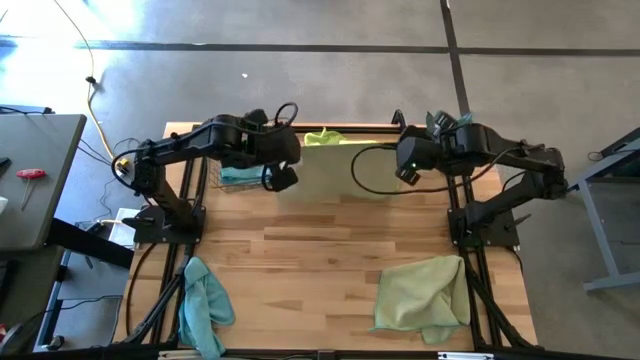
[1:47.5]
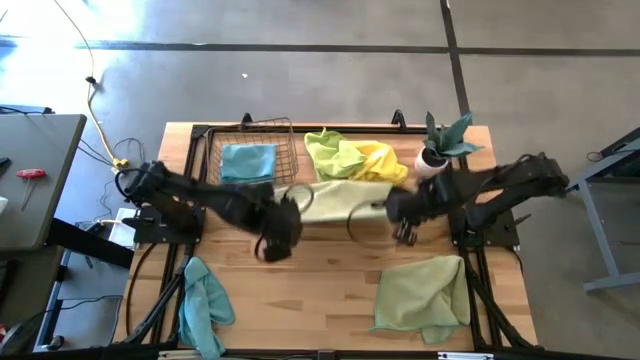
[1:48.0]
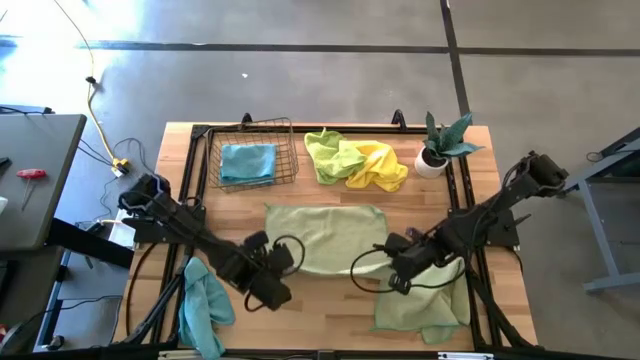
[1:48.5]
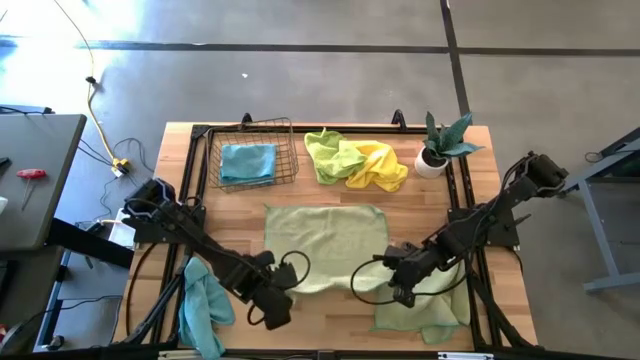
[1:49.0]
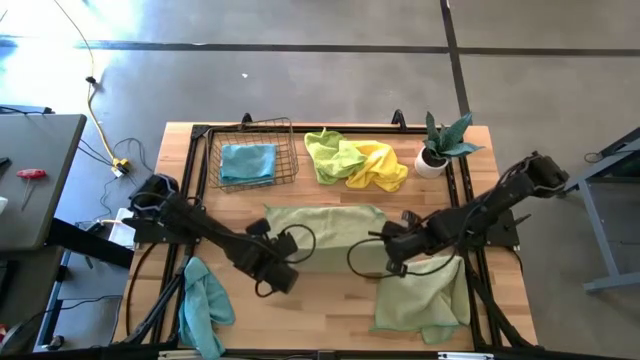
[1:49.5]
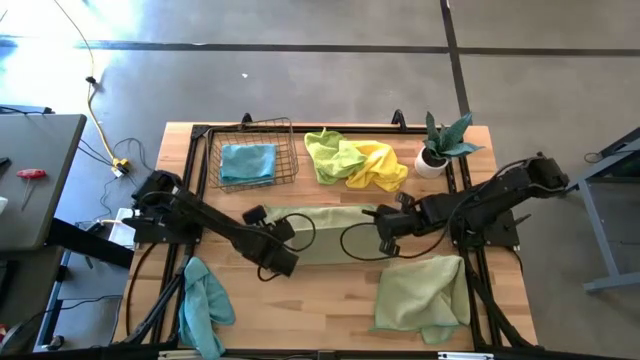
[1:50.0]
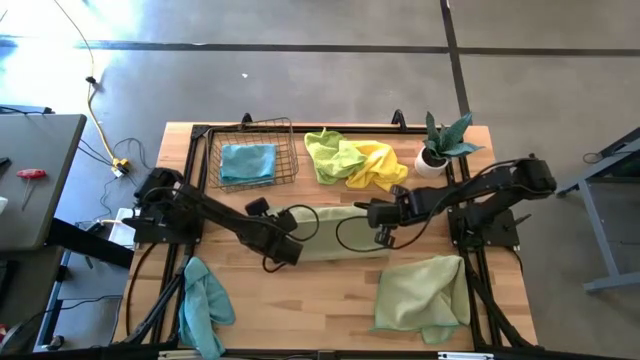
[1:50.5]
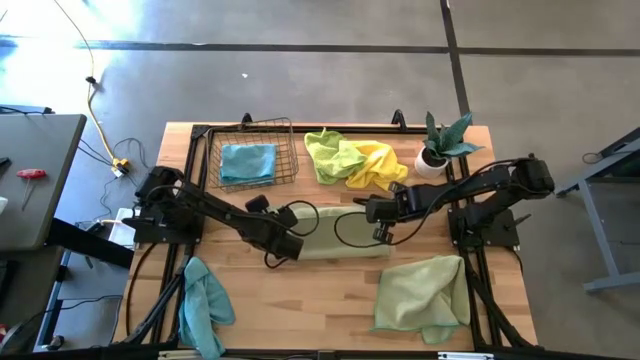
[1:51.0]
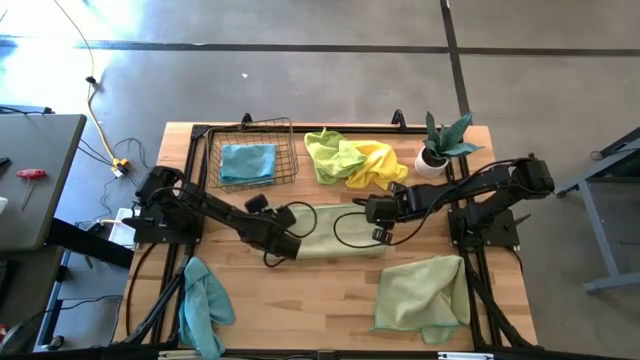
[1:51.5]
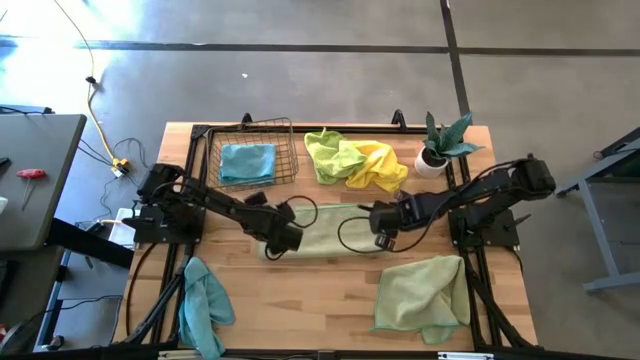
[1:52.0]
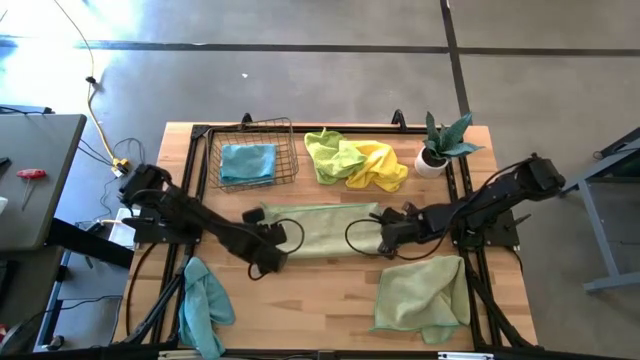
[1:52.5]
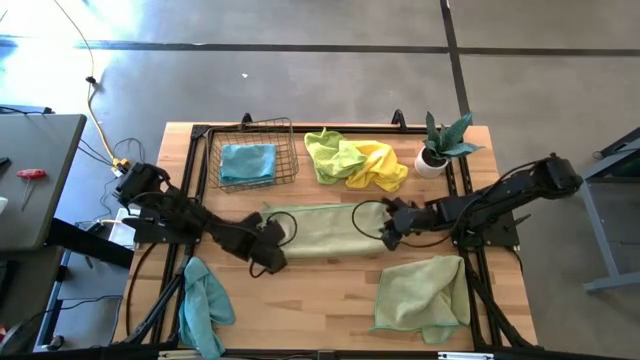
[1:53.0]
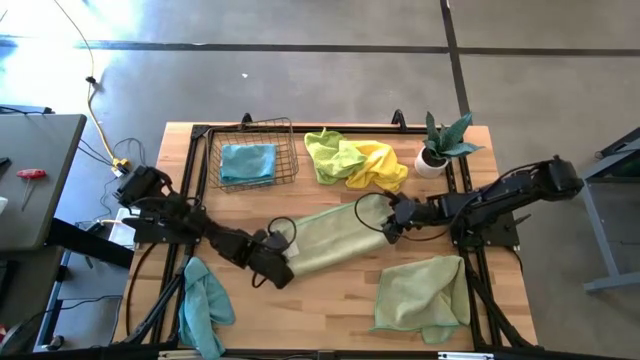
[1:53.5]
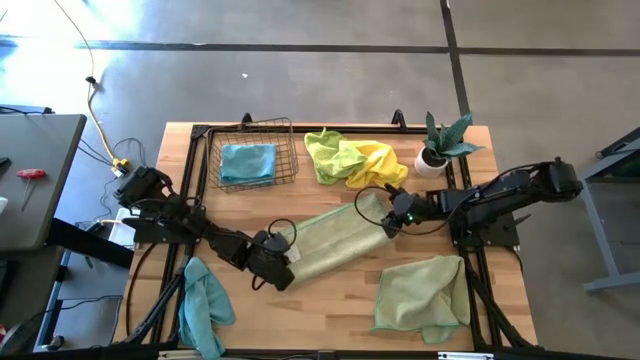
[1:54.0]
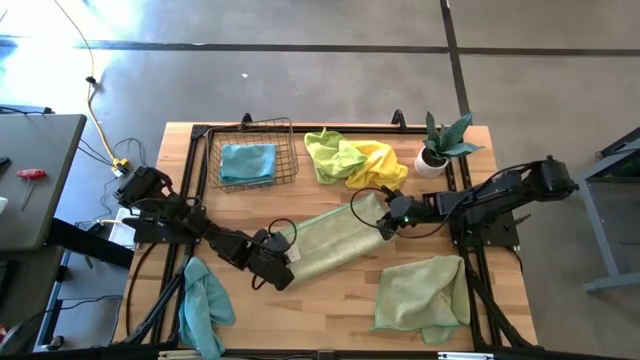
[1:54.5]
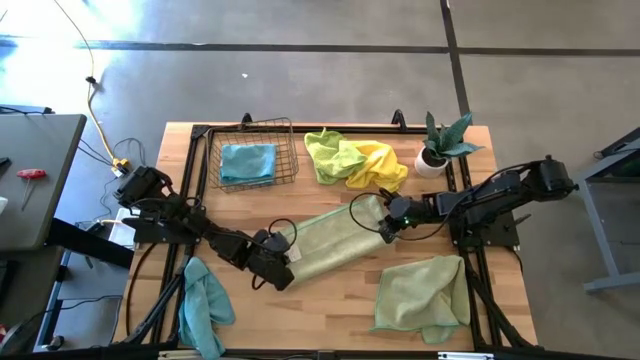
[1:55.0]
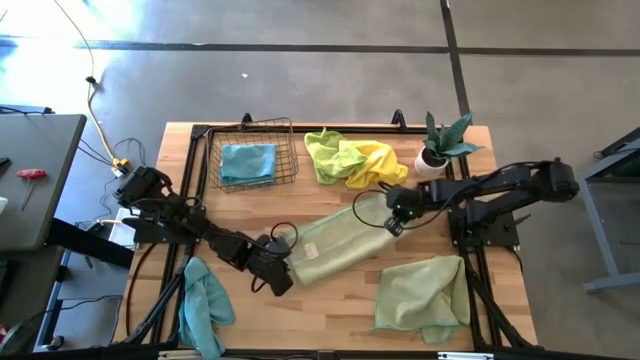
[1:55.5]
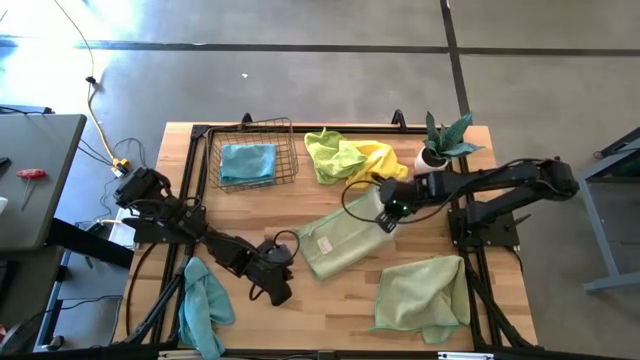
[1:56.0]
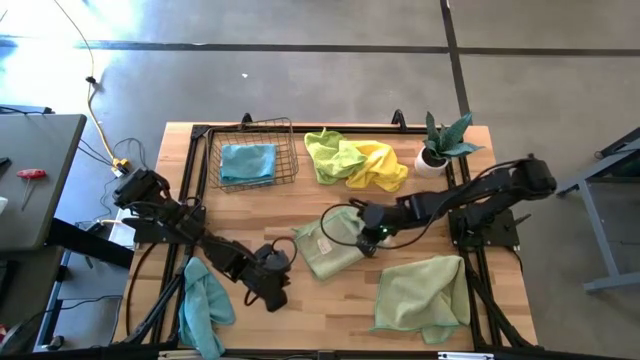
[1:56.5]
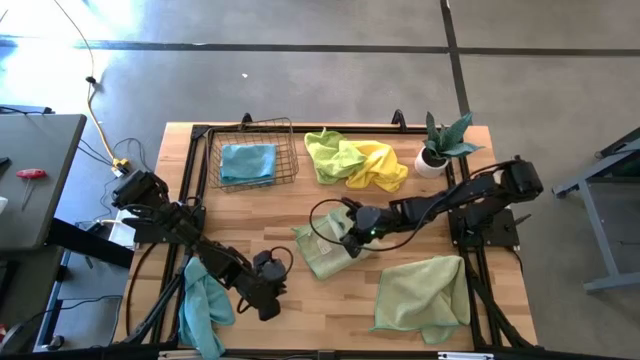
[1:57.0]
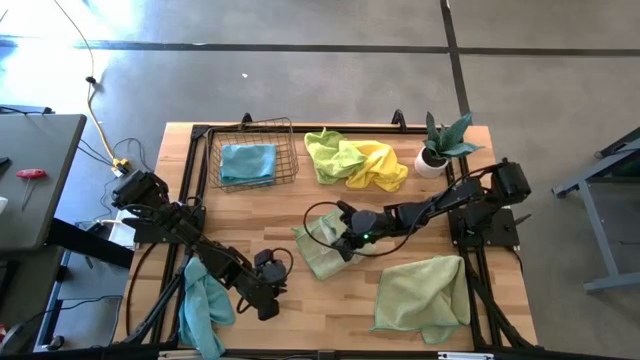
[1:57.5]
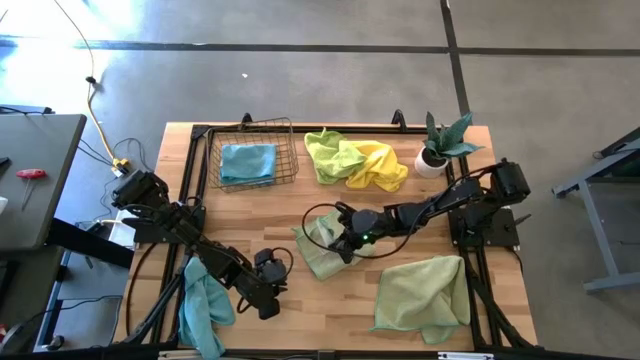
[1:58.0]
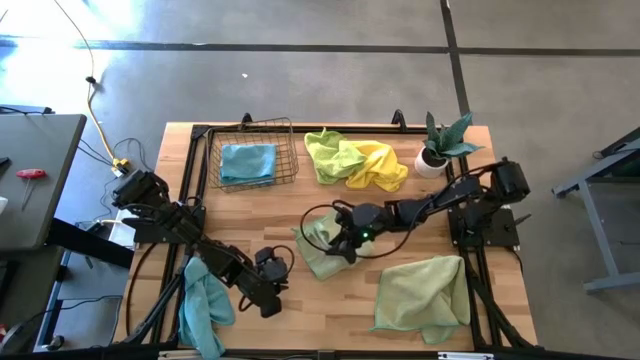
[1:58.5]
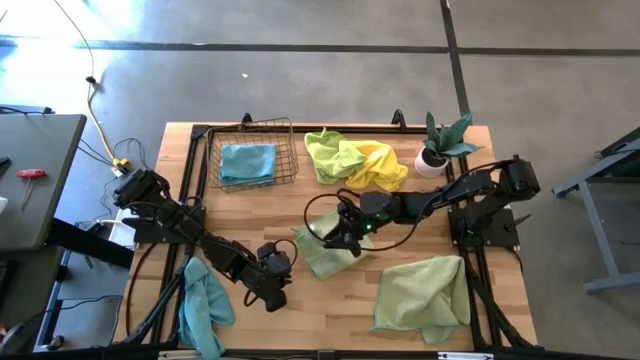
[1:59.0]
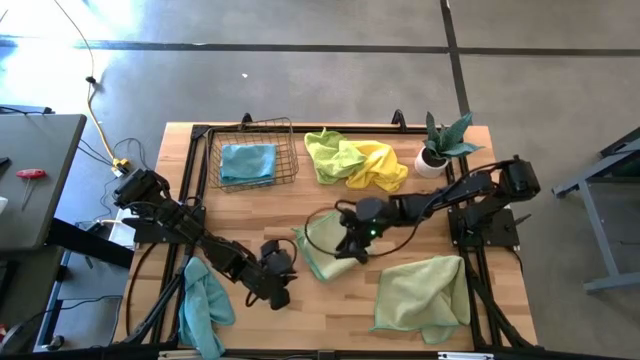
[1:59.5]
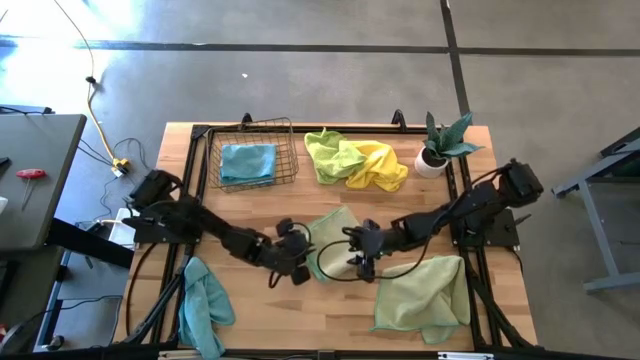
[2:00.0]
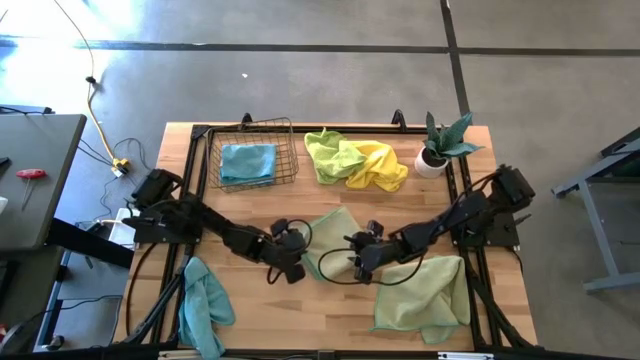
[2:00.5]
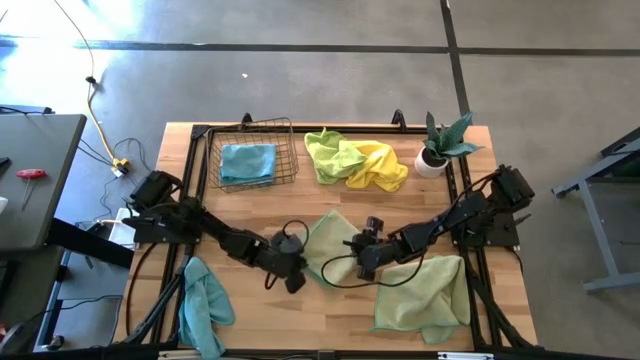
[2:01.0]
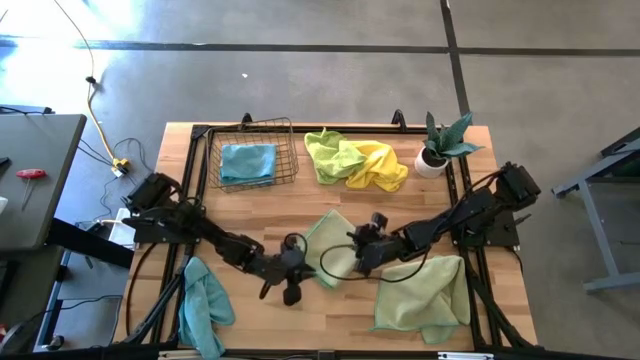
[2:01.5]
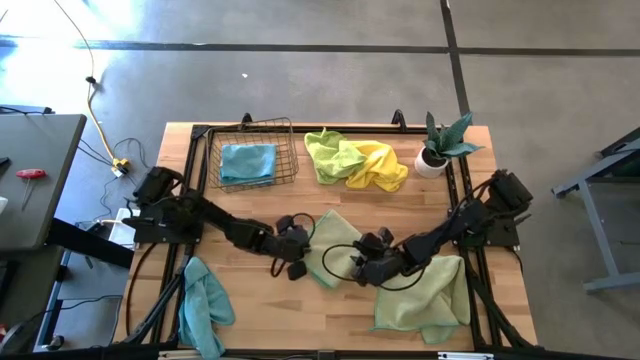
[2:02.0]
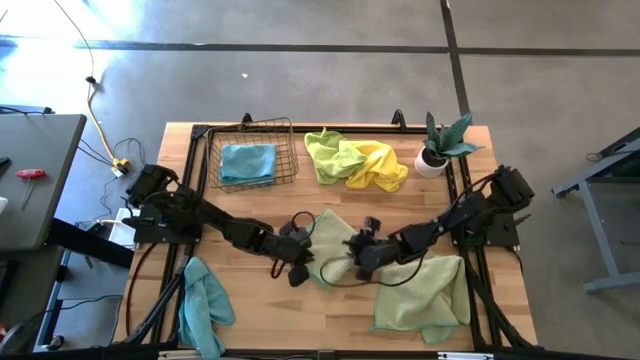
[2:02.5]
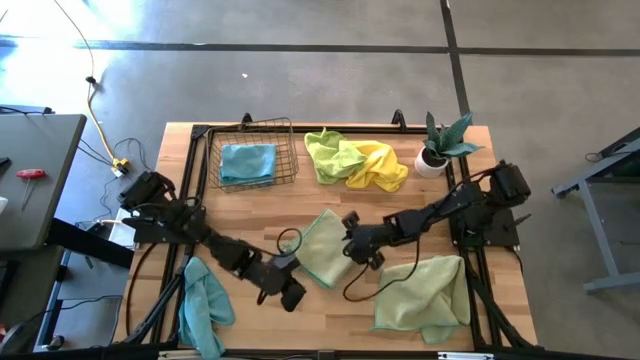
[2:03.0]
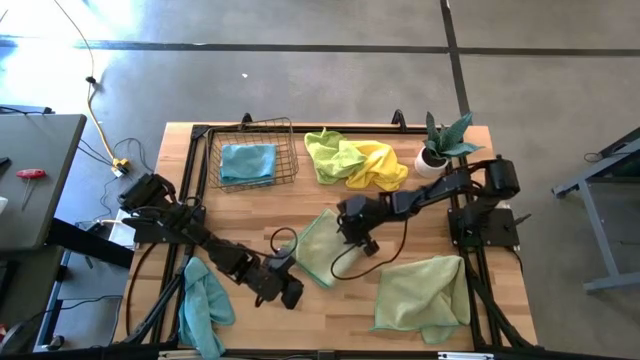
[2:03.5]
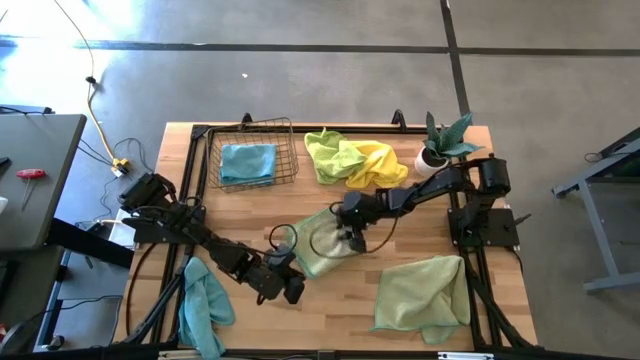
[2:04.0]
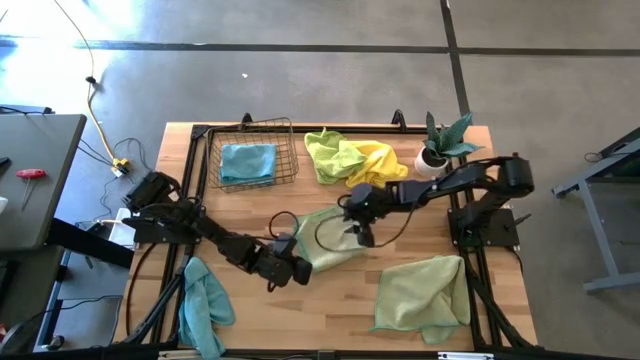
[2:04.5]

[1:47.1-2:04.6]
Task: Fold microfiber towels
Fold the left green towel

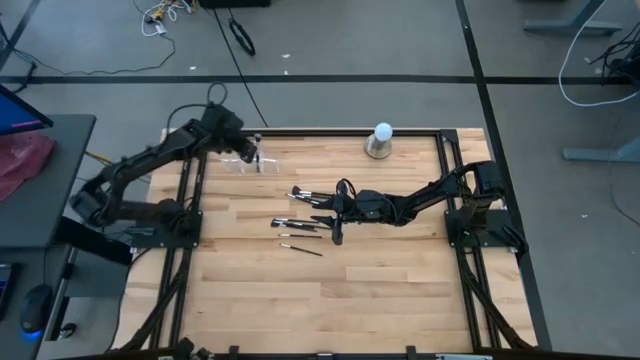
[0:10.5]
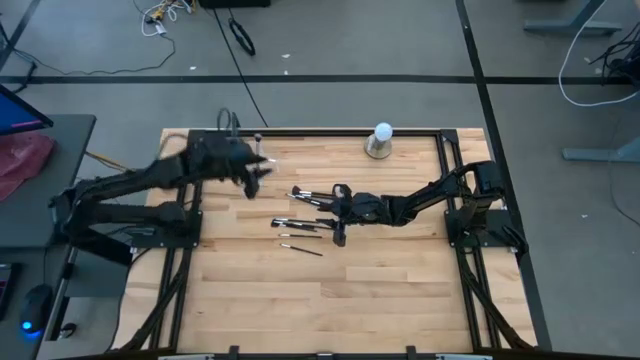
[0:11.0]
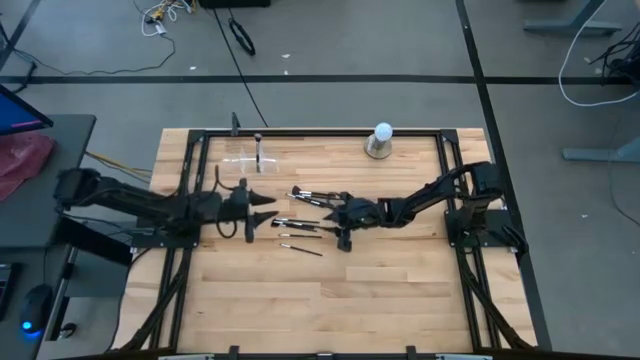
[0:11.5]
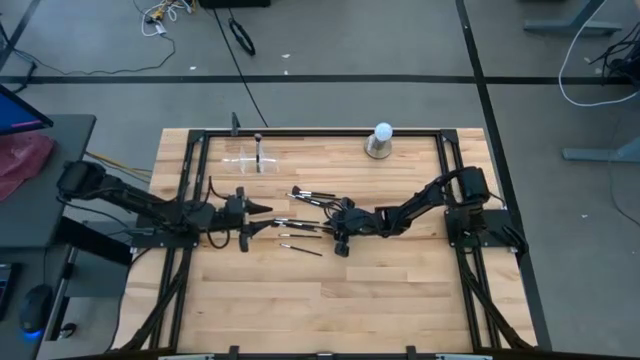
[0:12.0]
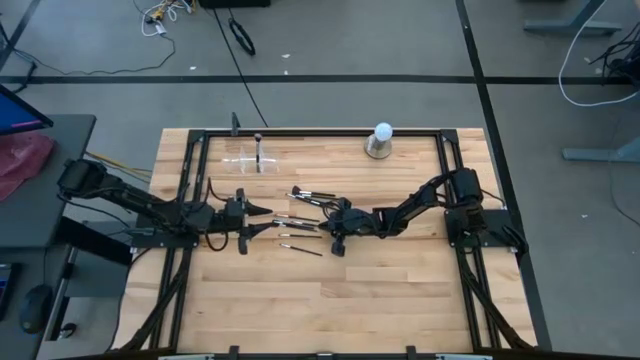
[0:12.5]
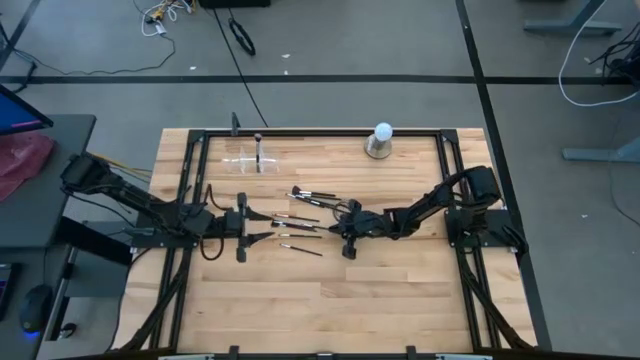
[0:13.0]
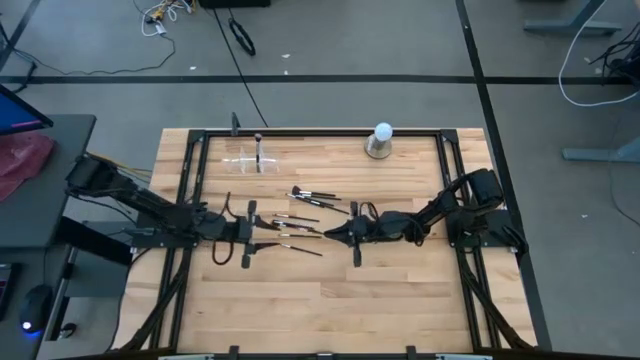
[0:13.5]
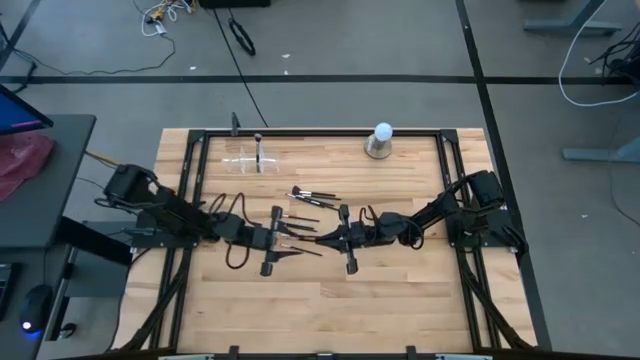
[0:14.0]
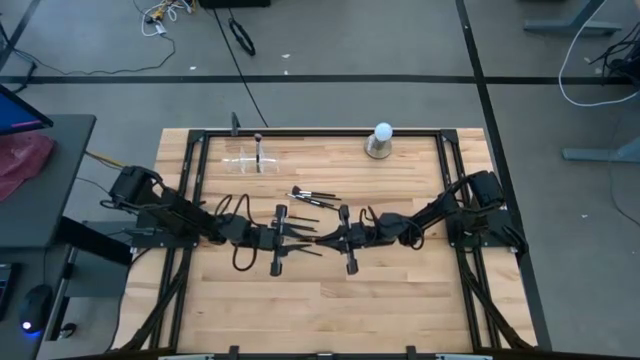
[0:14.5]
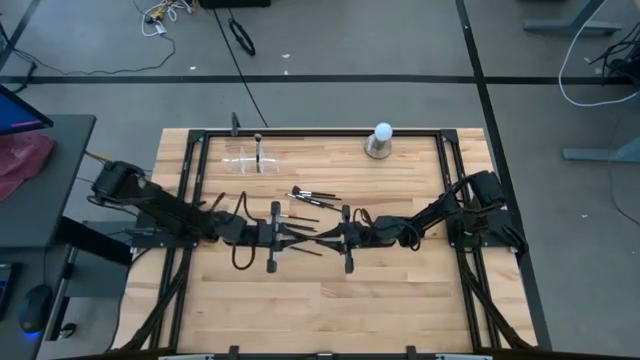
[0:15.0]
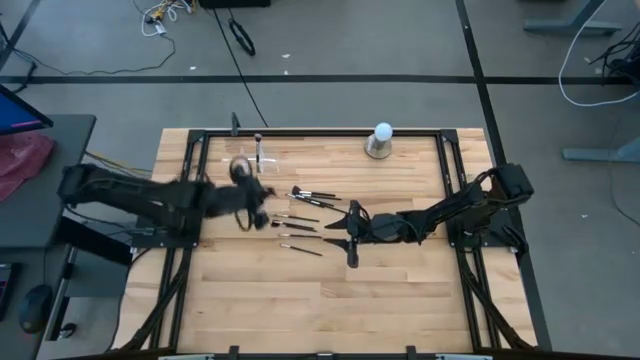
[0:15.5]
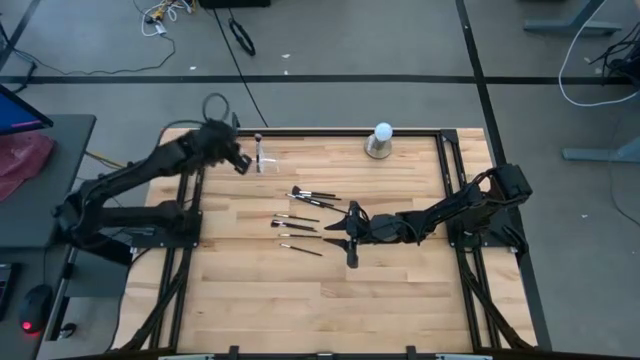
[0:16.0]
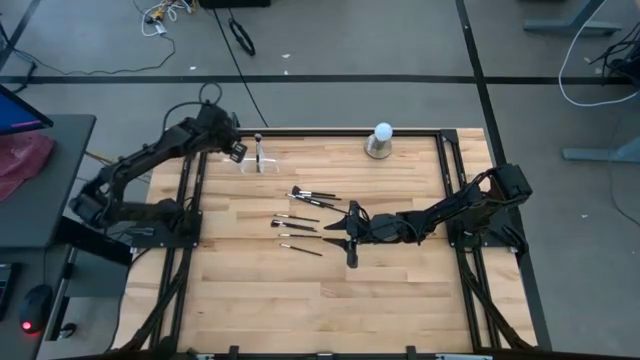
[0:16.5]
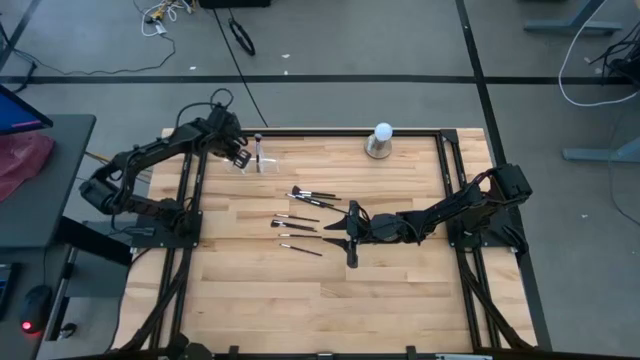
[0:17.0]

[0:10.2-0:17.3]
Task: Put items in baskets/containers
Put the eyeshadow brush into the transparent organizer
